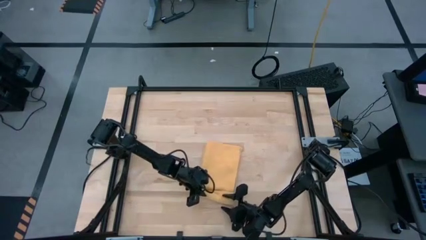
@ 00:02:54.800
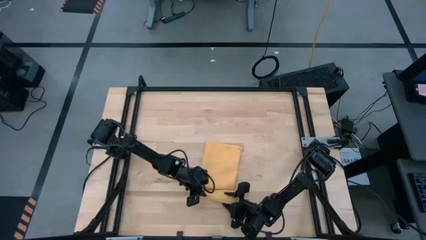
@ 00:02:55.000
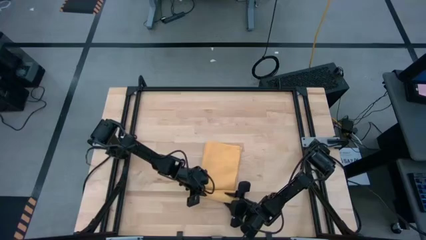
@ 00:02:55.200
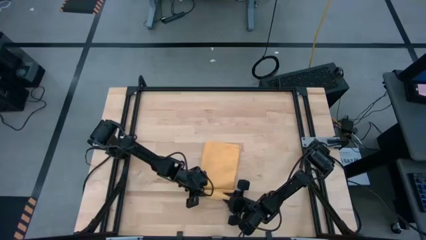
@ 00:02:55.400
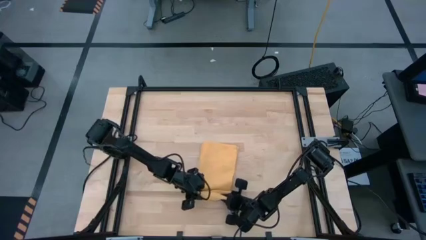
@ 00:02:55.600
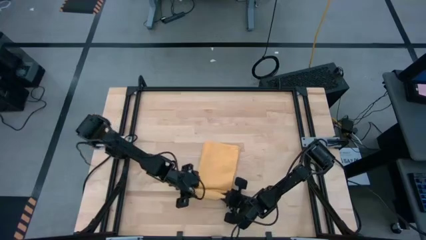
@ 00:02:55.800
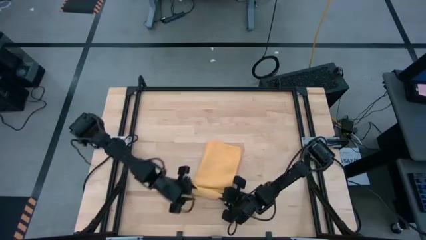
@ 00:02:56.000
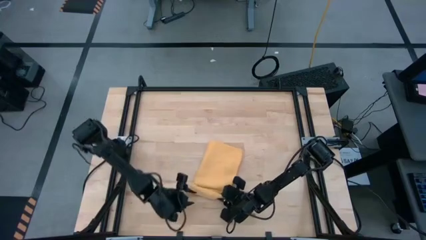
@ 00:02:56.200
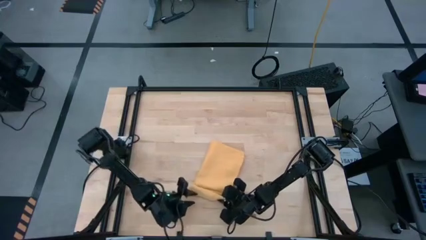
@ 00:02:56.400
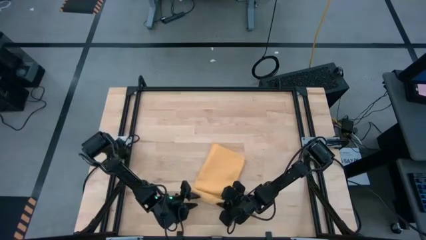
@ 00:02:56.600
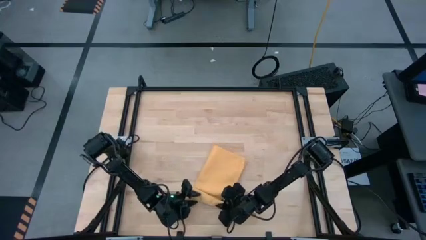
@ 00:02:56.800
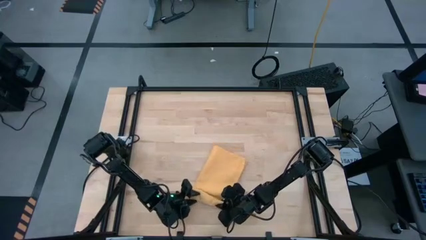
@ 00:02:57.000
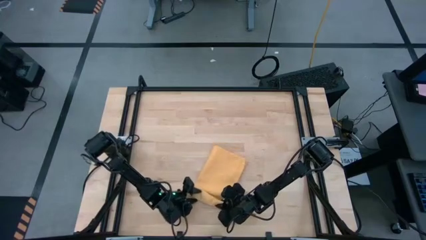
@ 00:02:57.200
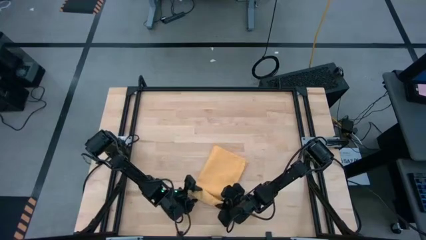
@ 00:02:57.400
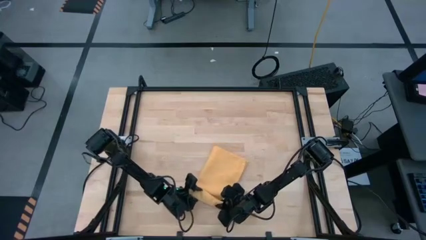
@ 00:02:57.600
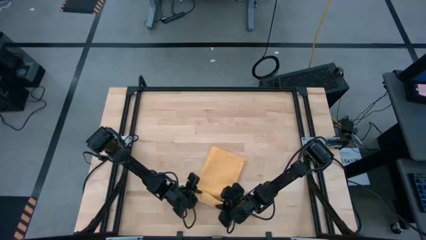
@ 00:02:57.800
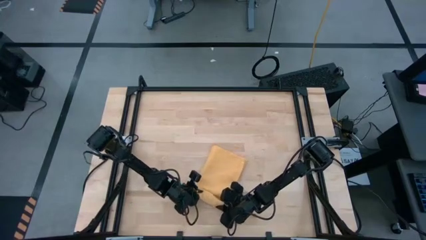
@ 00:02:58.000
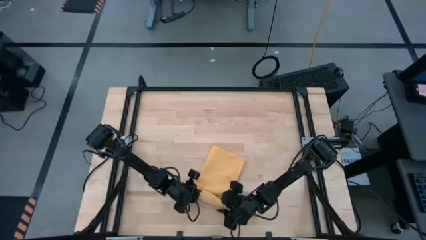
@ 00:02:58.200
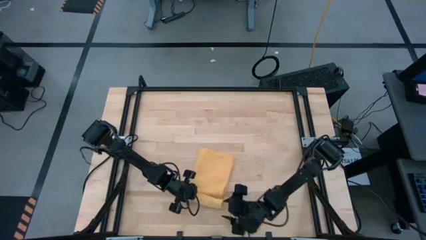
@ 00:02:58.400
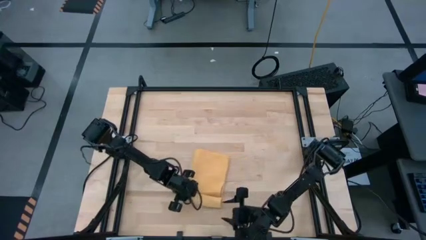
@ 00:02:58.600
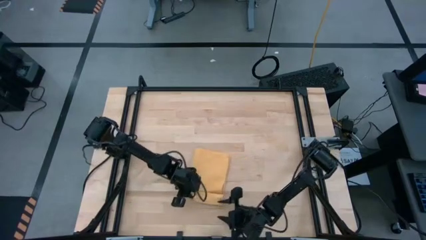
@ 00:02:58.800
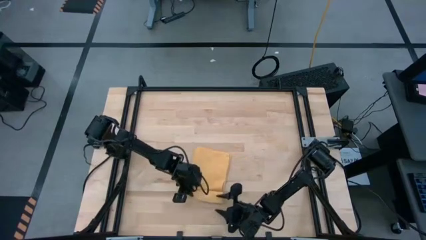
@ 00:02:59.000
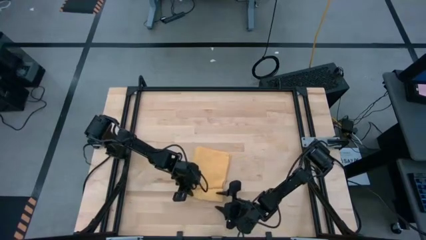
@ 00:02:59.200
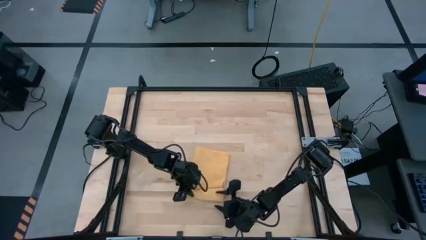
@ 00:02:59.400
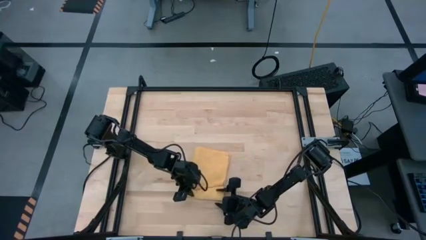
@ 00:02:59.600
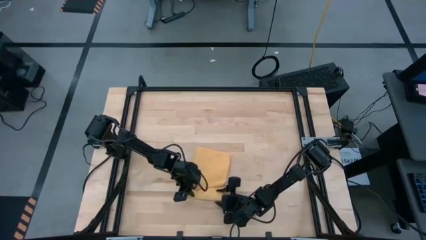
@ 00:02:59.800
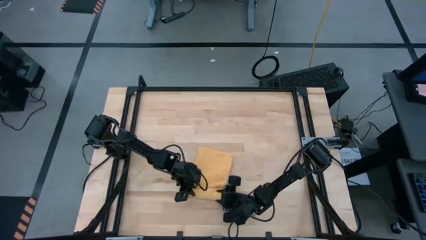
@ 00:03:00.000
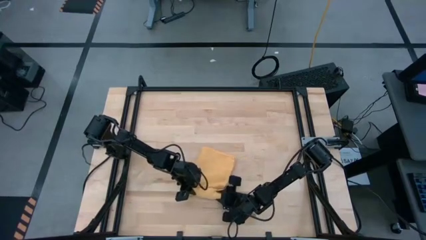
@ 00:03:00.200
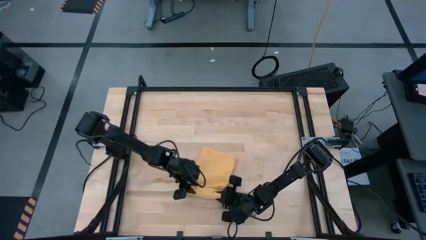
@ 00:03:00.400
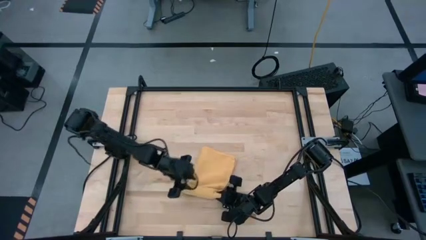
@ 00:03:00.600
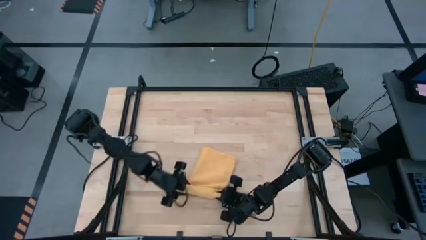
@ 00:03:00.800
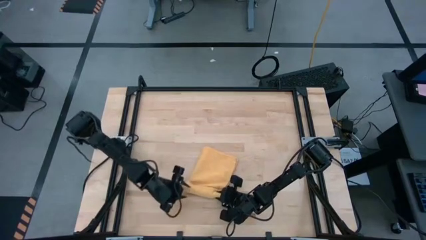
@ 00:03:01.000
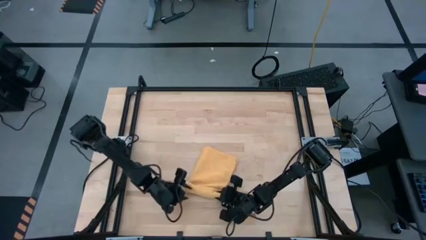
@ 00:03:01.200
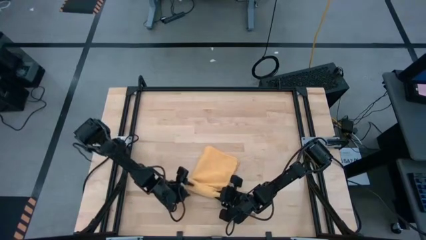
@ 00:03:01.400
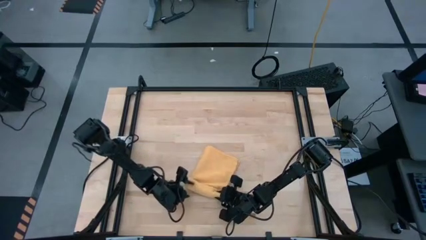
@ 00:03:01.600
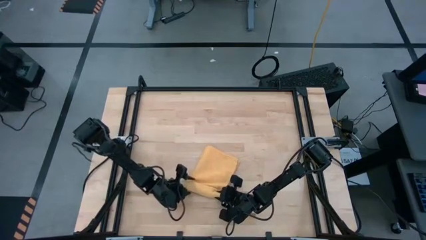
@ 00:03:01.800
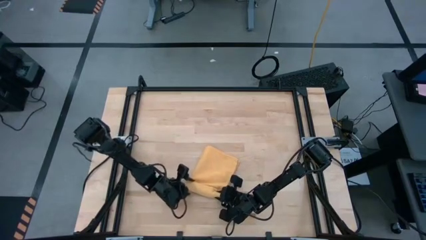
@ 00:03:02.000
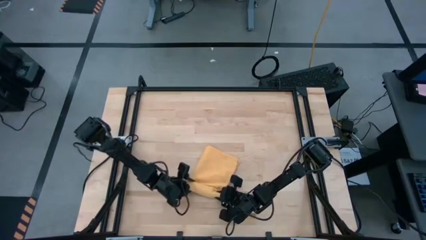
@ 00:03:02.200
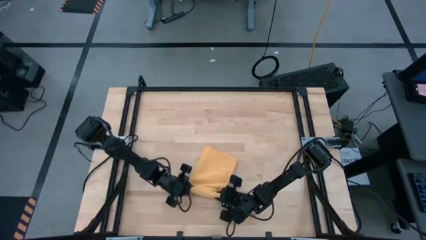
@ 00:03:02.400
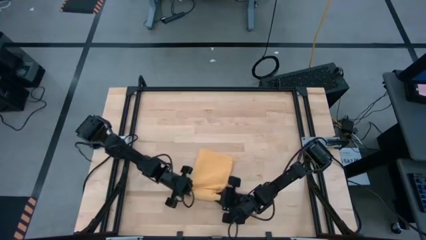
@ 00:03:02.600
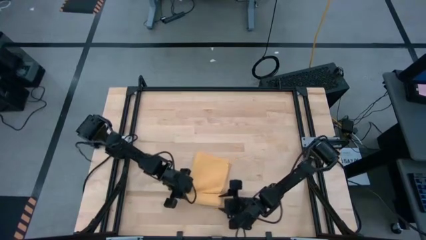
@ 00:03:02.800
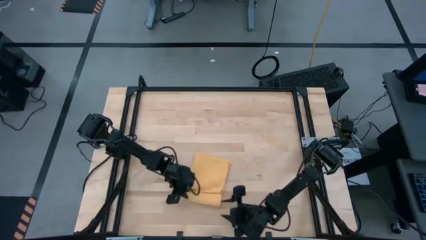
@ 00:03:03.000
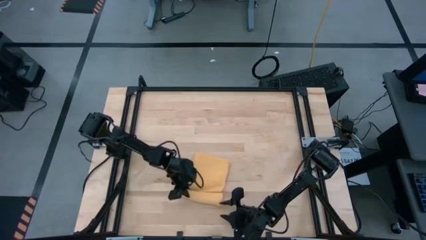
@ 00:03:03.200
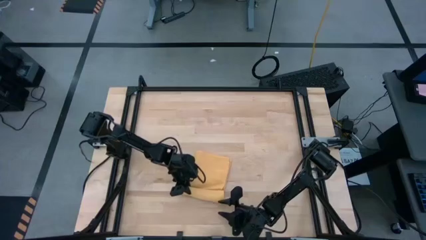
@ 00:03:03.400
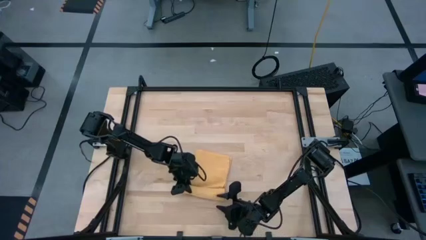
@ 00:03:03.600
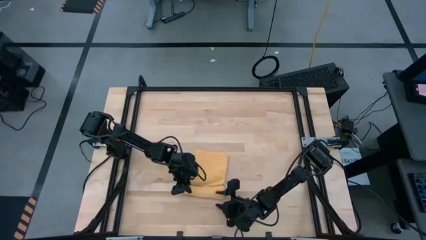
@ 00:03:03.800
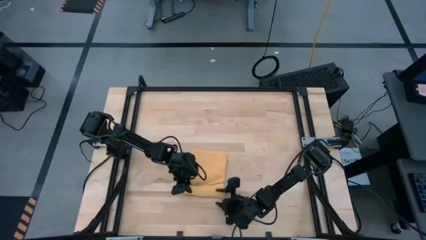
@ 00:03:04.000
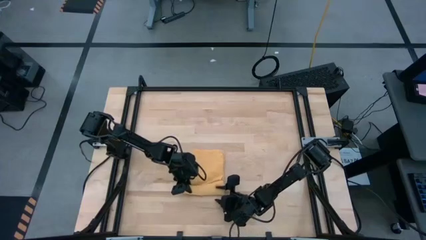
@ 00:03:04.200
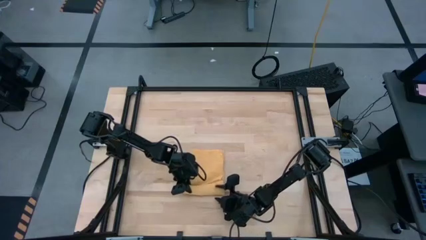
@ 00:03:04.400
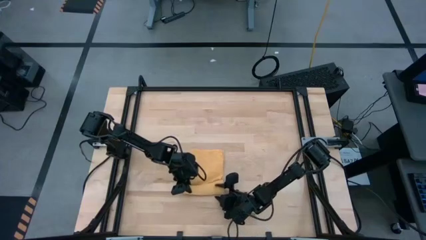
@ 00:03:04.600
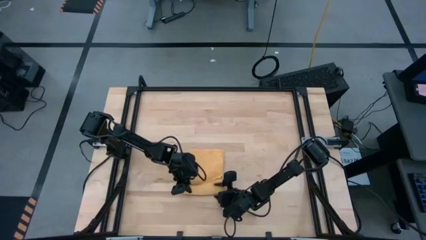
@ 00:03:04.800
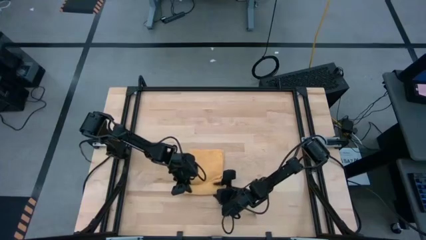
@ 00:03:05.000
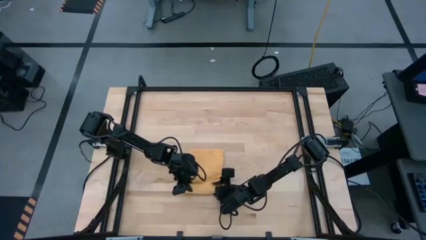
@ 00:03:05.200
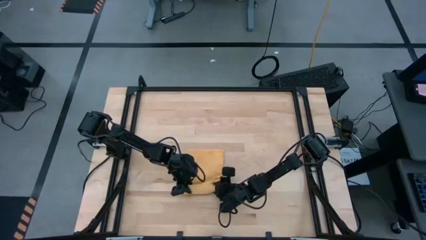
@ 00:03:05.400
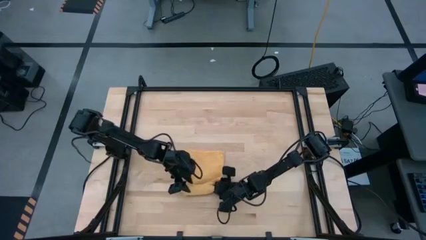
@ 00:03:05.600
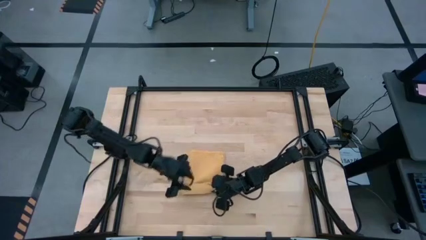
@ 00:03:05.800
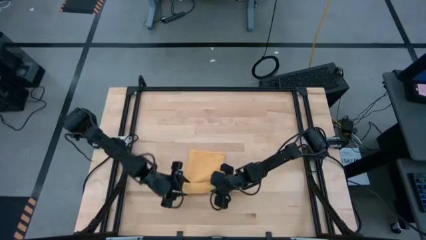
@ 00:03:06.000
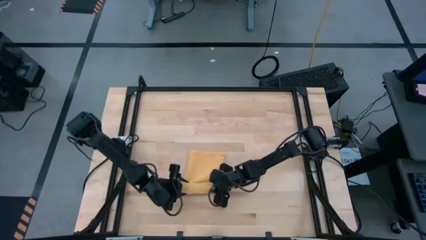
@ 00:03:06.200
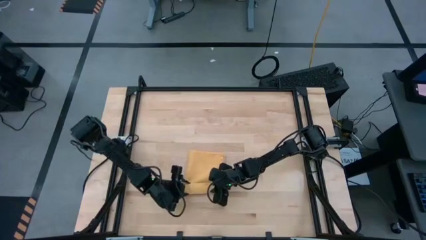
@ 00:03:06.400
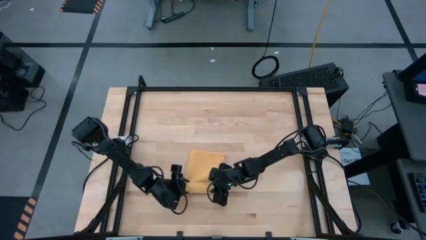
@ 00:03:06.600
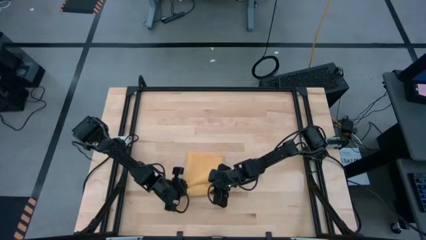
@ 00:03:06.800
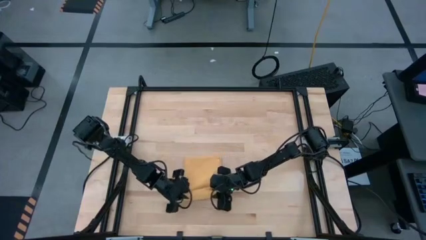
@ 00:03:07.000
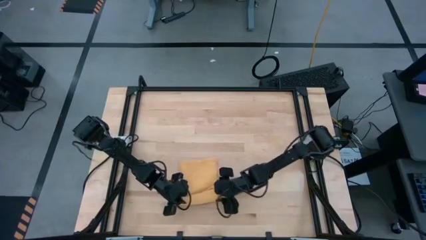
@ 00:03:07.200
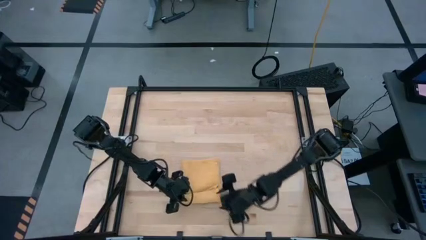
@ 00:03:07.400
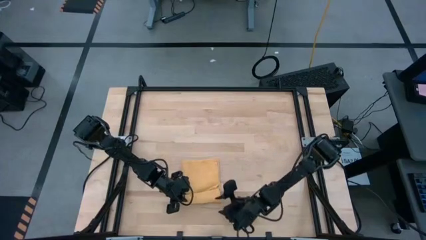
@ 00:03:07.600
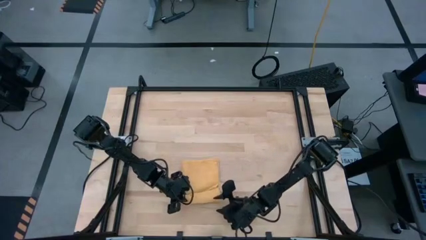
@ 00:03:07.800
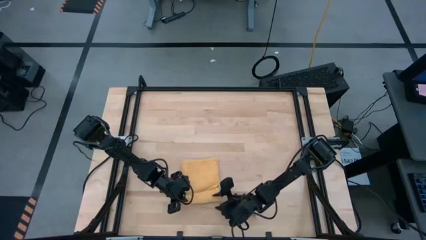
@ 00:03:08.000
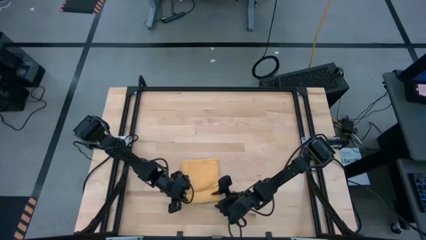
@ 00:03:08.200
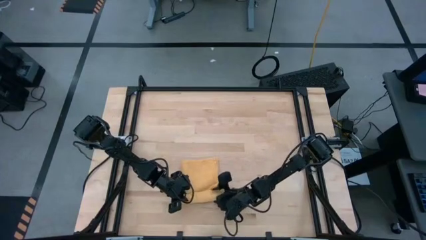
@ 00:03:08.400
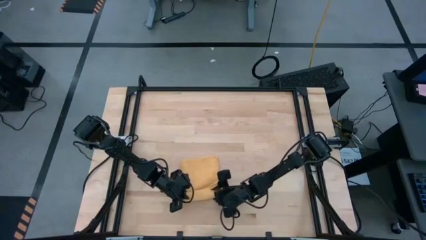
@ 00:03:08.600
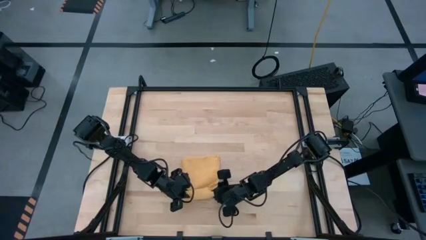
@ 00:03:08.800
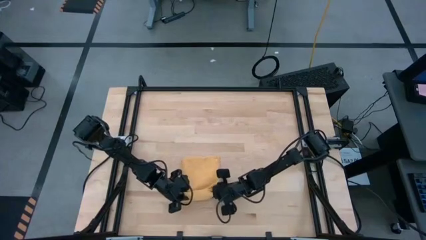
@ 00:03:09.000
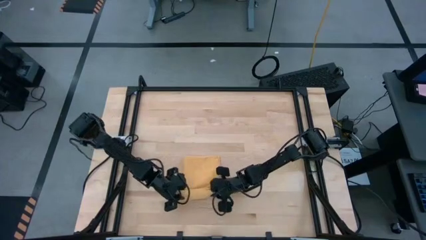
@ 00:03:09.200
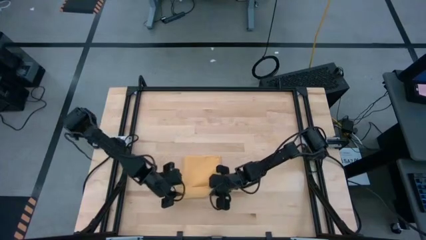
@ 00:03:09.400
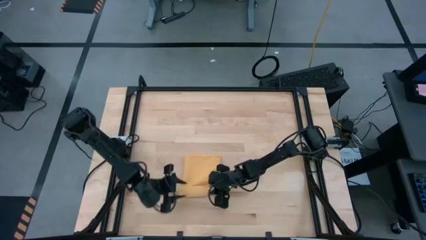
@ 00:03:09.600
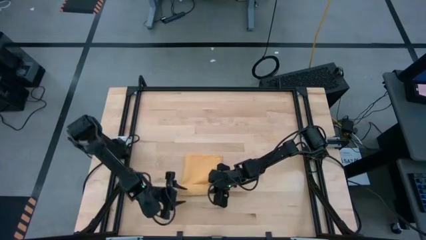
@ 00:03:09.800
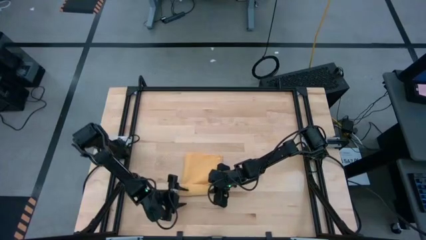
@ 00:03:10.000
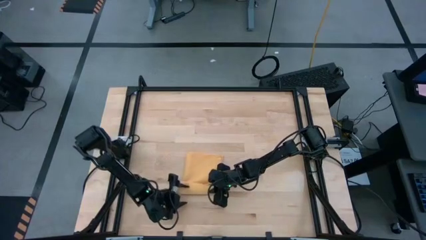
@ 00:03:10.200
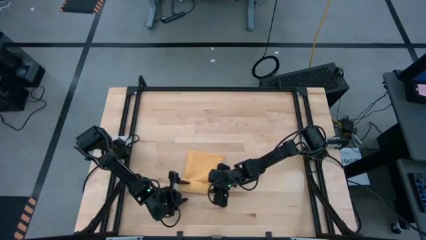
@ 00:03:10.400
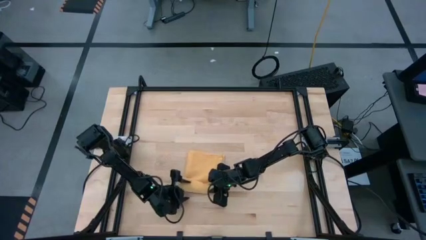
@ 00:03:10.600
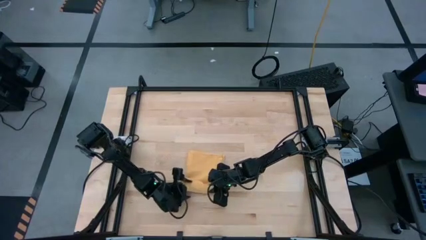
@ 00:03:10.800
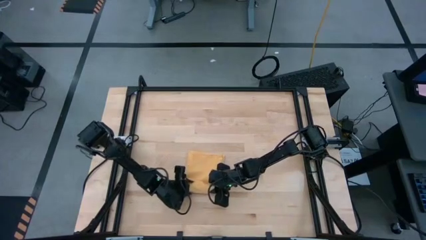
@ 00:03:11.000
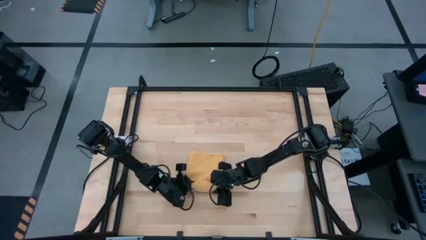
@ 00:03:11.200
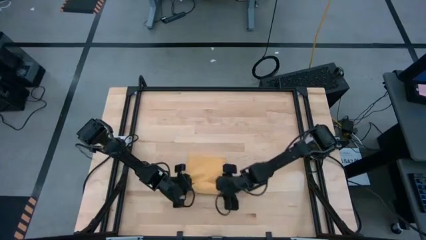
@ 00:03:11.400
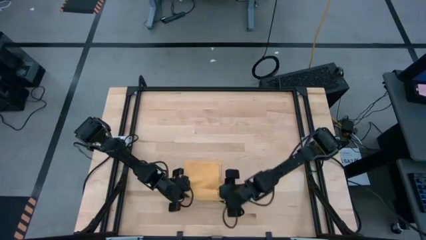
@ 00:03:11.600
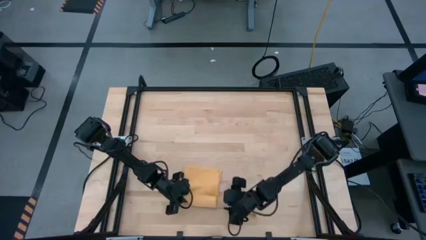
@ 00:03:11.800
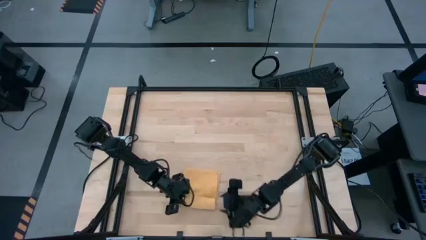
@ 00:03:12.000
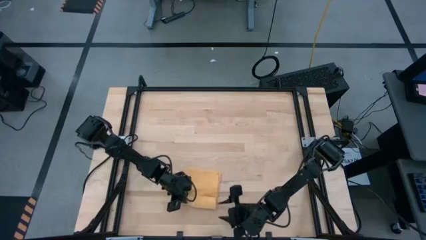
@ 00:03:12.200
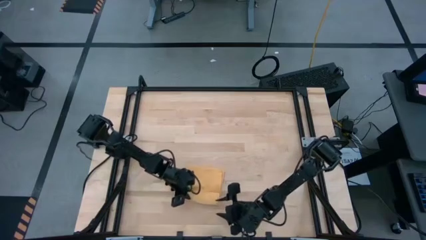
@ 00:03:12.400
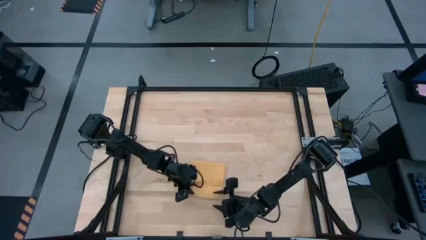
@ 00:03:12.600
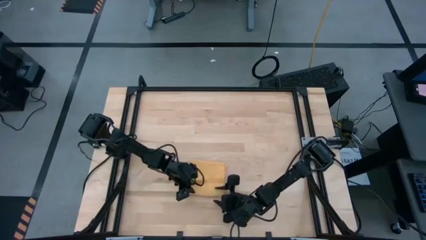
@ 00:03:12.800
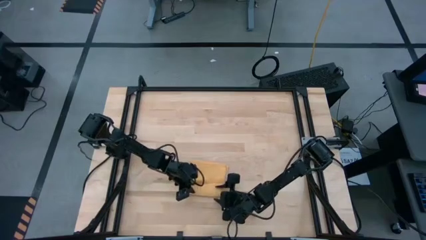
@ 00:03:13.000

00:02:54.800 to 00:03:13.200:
Task: Roll towel
Roll the yellow towel
